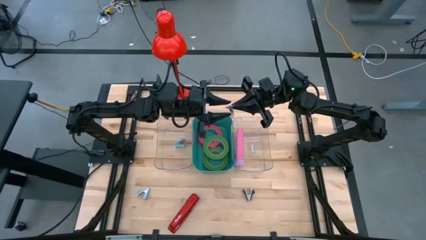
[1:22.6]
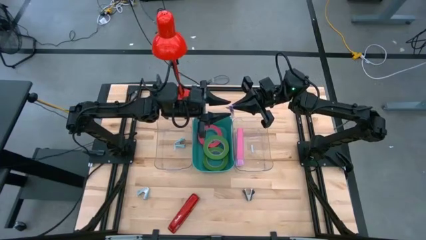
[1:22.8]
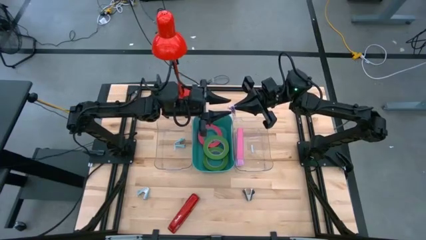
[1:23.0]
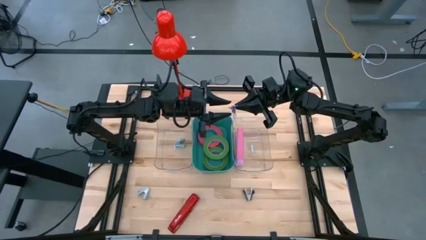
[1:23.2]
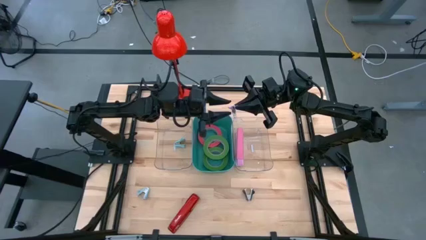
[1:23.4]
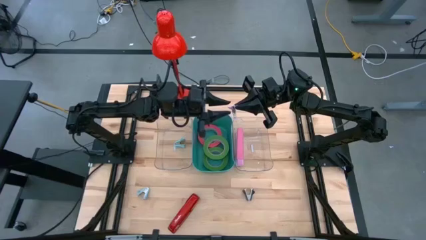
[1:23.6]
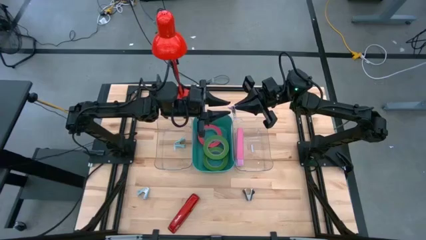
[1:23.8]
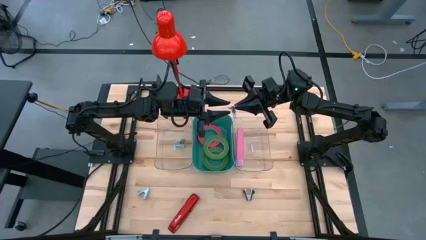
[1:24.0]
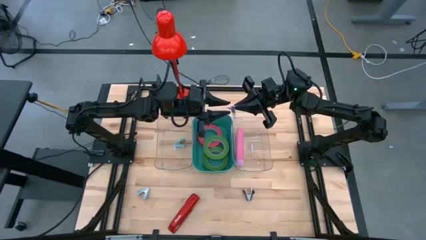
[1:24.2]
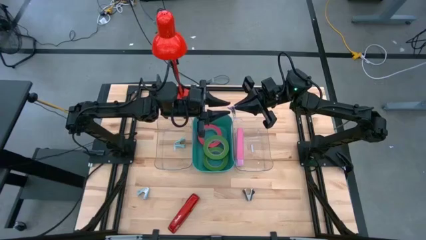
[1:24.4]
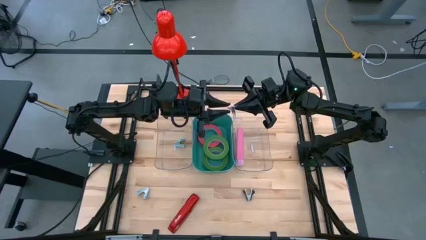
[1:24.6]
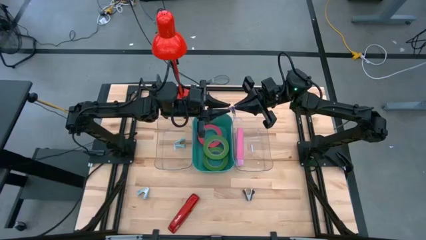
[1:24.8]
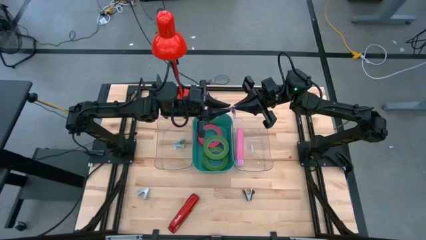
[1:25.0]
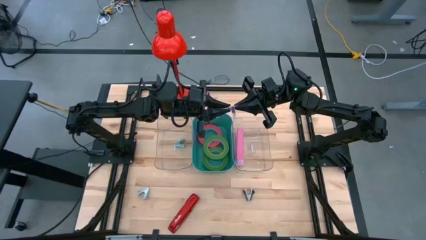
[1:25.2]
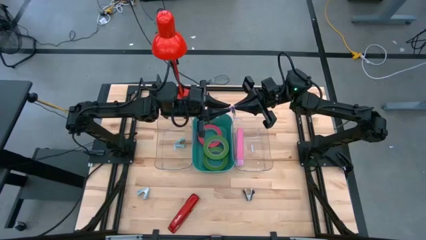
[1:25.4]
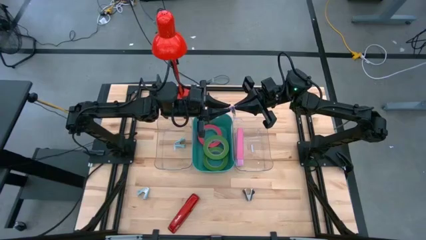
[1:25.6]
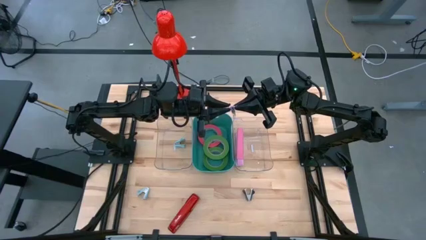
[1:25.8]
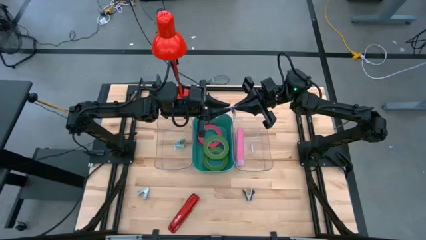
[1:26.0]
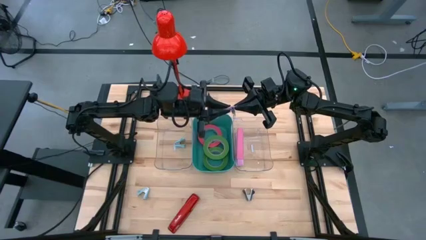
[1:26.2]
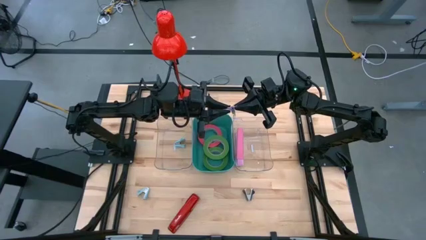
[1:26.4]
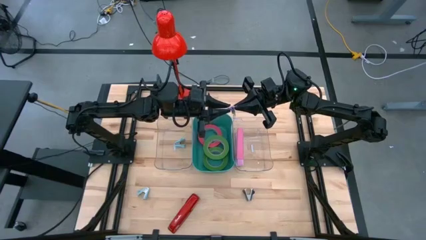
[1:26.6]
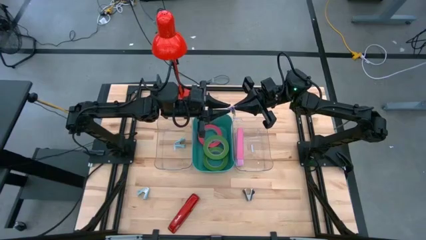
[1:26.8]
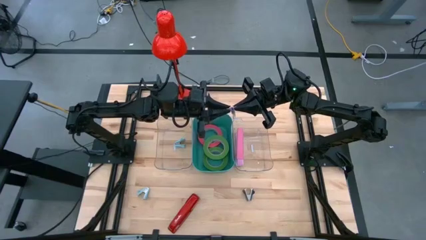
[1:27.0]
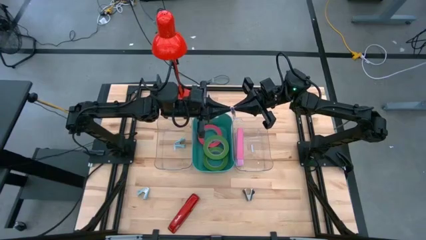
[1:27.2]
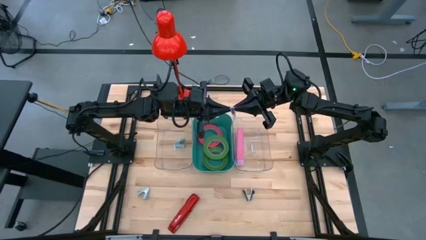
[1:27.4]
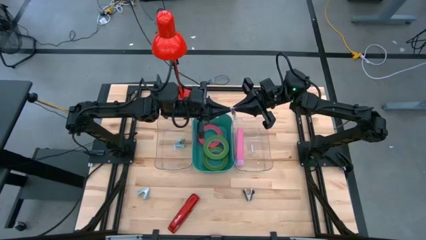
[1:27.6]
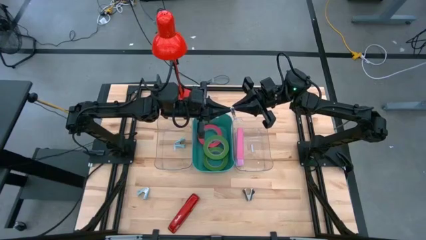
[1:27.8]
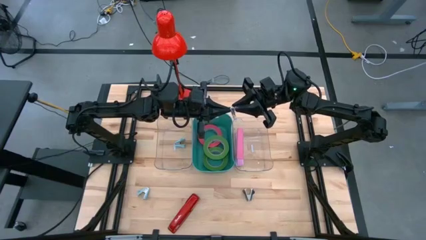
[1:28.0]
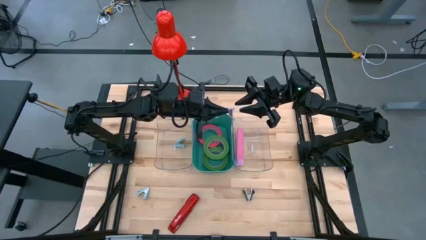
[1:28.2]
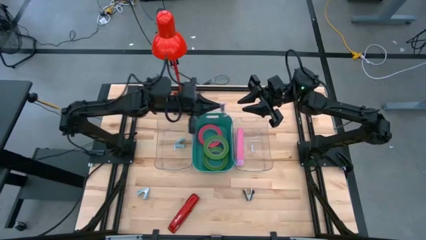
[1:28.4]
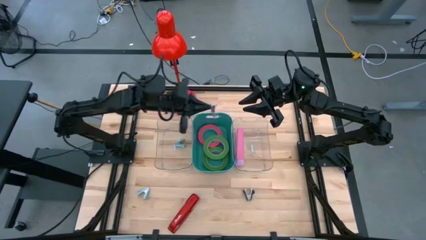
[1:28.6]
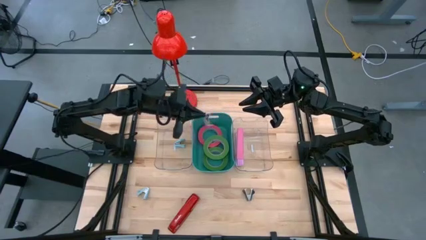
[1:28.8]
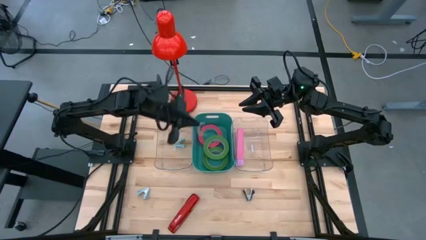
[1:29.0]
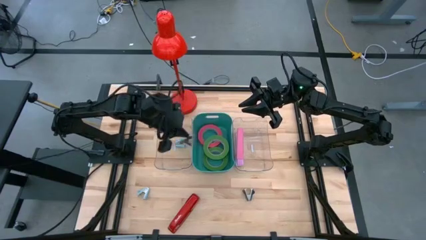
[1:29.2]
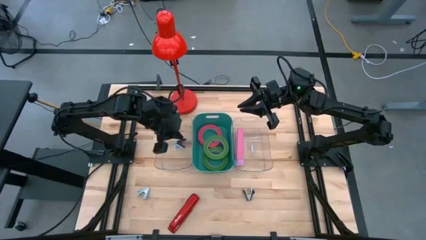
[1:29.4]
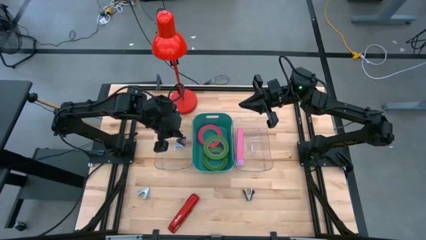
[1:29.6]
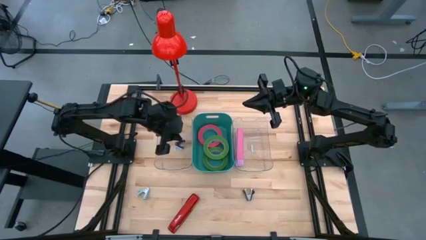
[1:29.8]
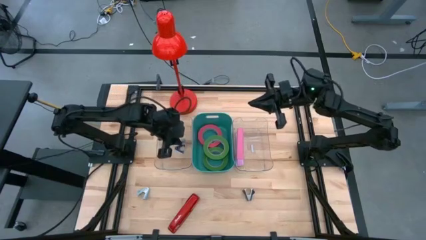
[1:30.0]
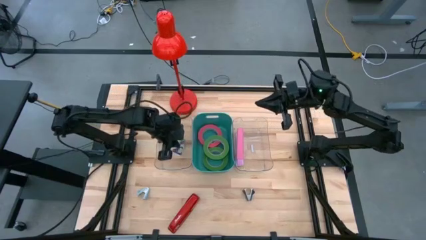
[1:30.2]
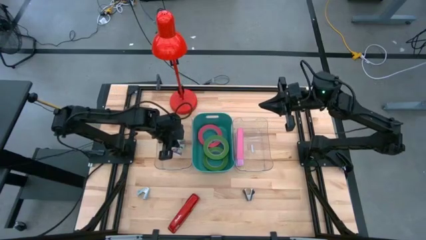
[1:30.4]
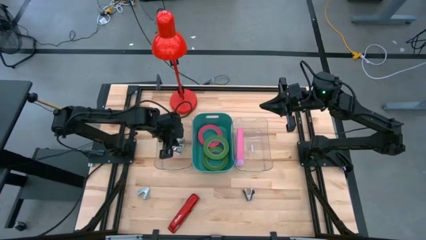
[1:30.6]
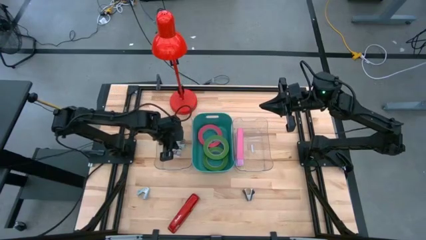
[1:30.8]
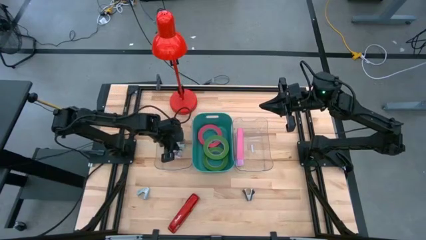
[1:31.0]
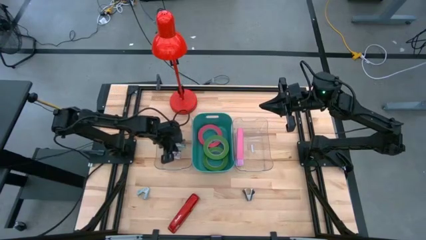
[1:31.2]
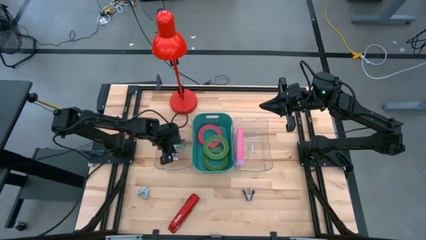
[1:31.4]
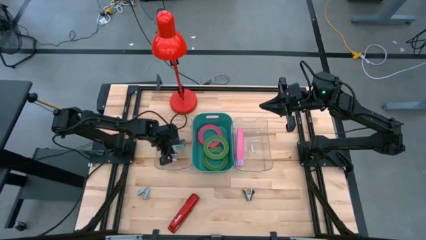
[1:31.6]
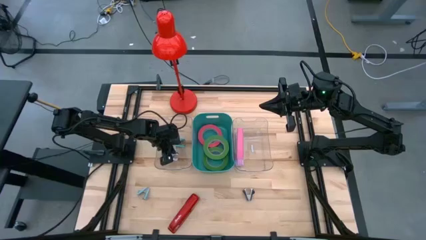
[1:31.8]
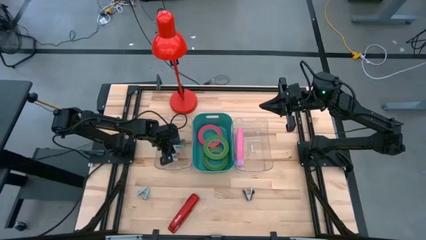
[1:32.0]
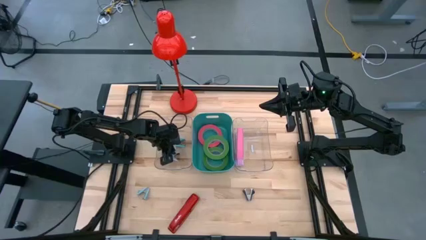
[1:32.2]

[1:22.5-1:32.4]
Task: Pick and place Stapler, Stapler remover, tape
Put the top light blue stapler remover into the left transparent bin
